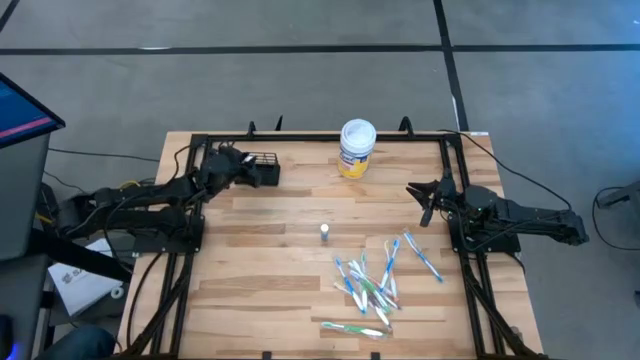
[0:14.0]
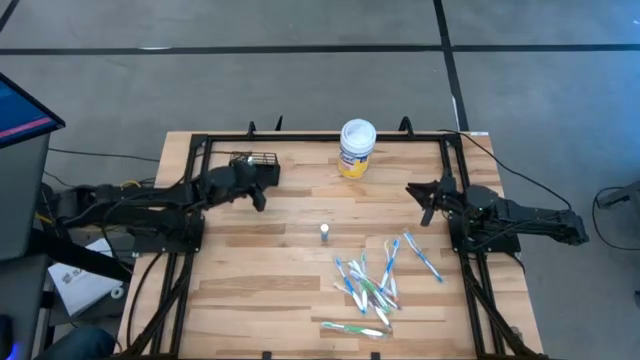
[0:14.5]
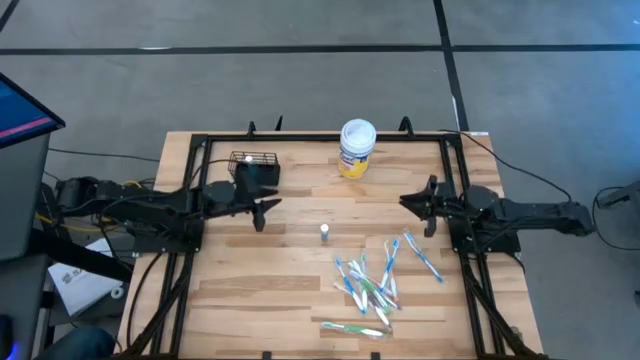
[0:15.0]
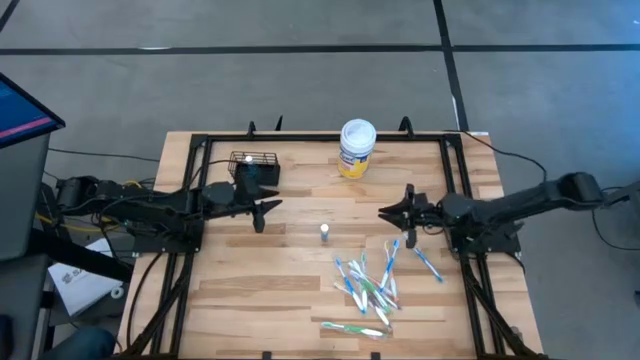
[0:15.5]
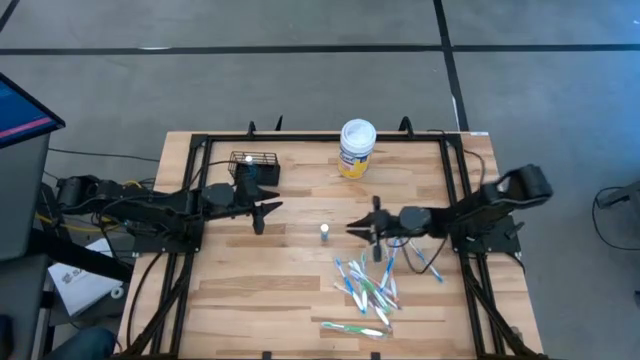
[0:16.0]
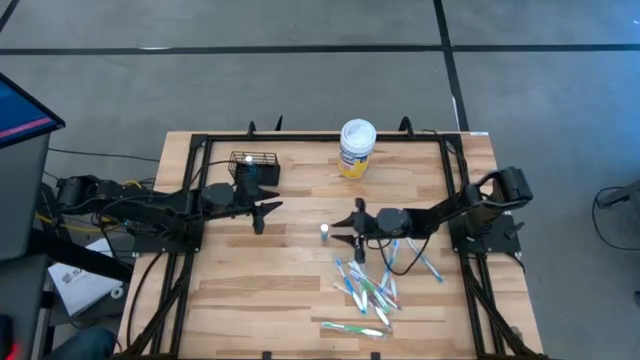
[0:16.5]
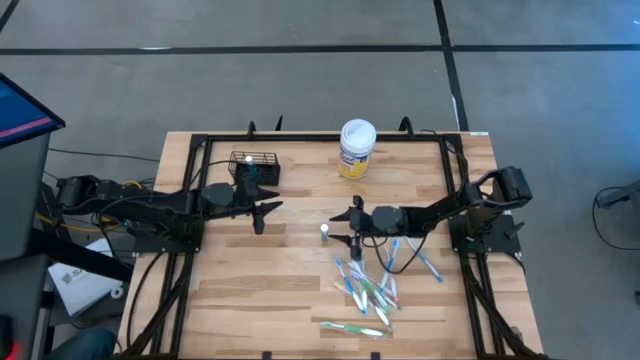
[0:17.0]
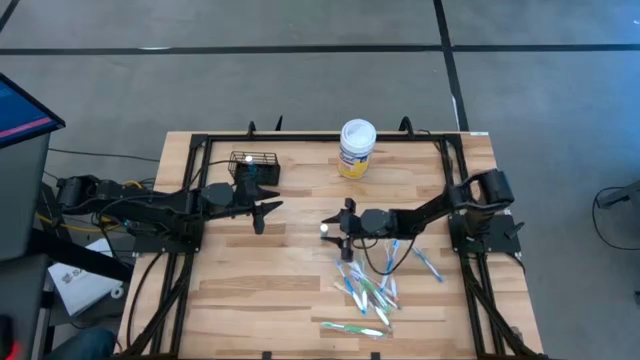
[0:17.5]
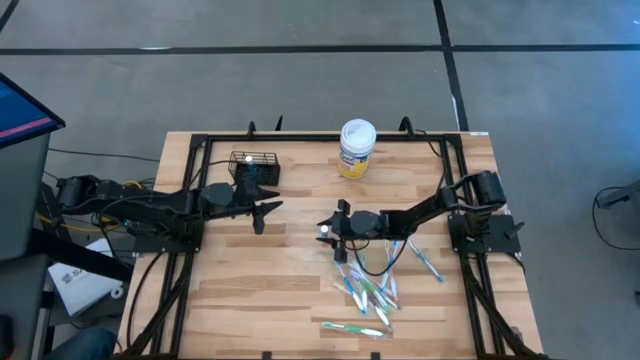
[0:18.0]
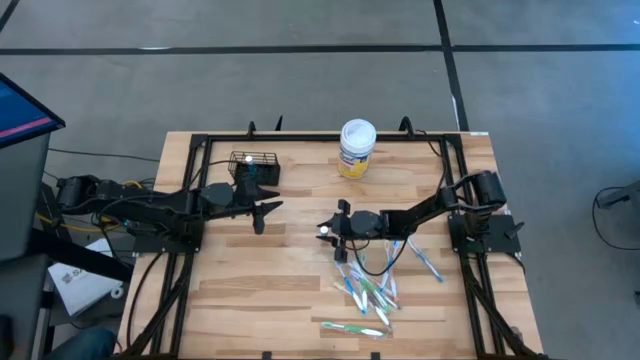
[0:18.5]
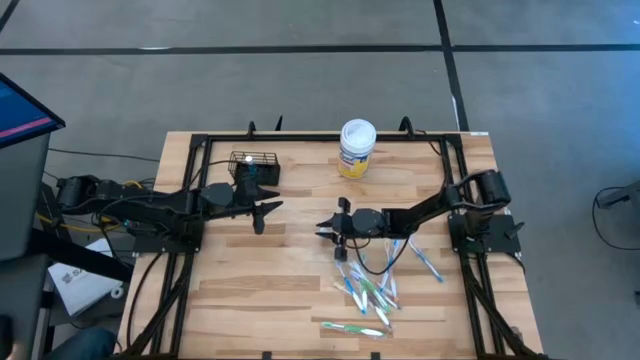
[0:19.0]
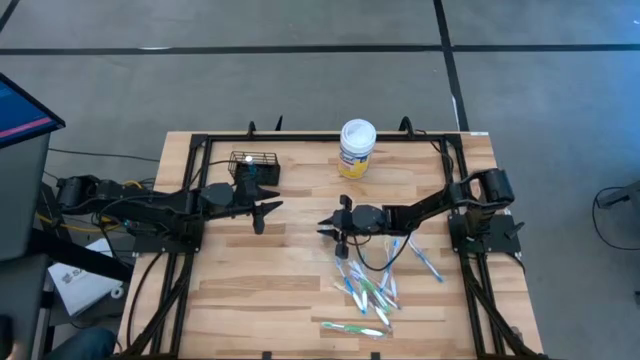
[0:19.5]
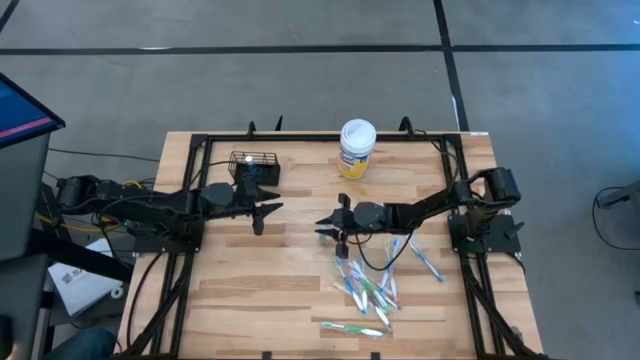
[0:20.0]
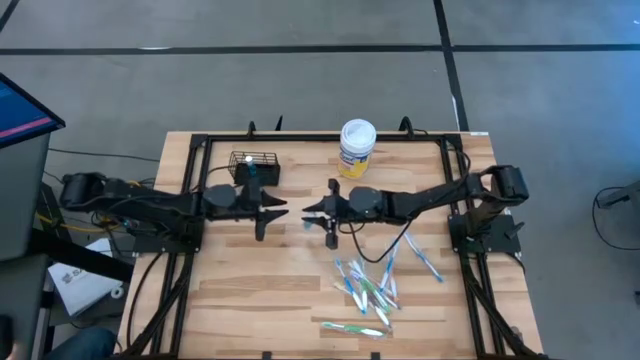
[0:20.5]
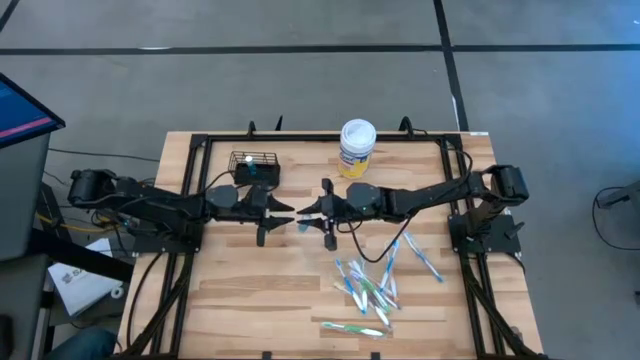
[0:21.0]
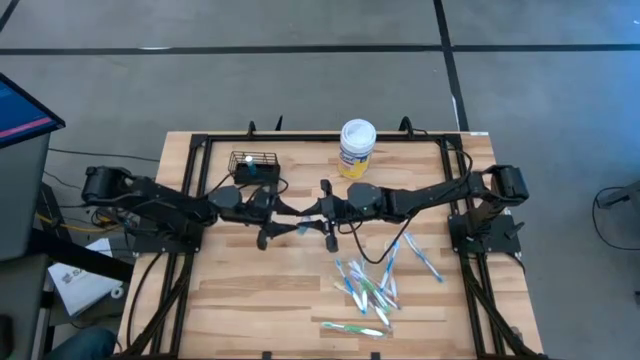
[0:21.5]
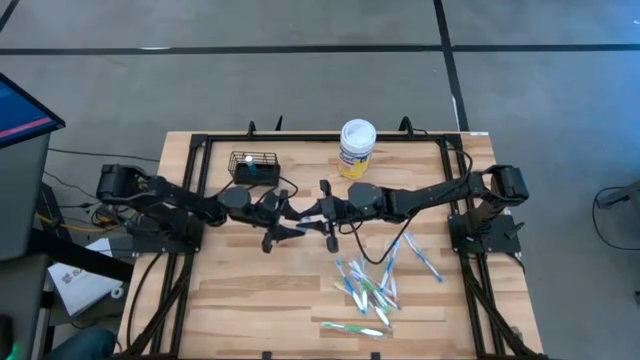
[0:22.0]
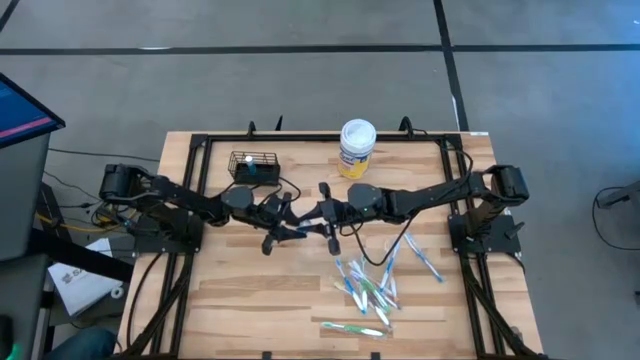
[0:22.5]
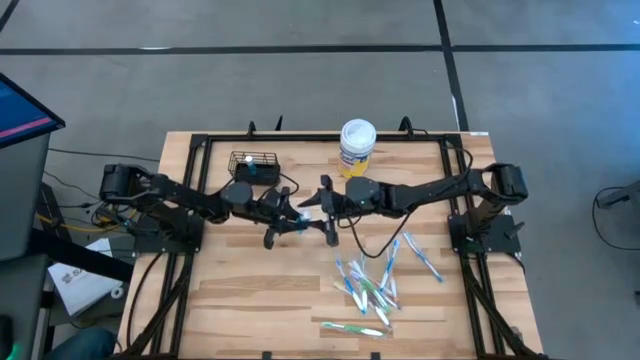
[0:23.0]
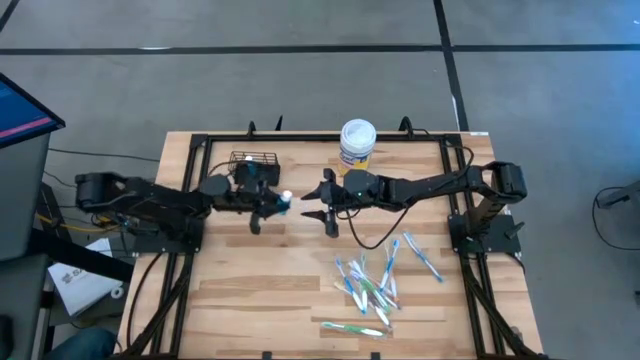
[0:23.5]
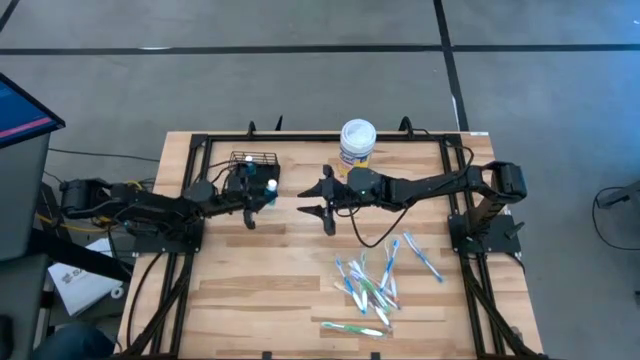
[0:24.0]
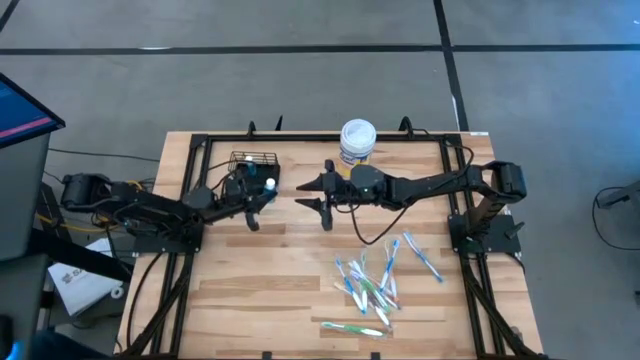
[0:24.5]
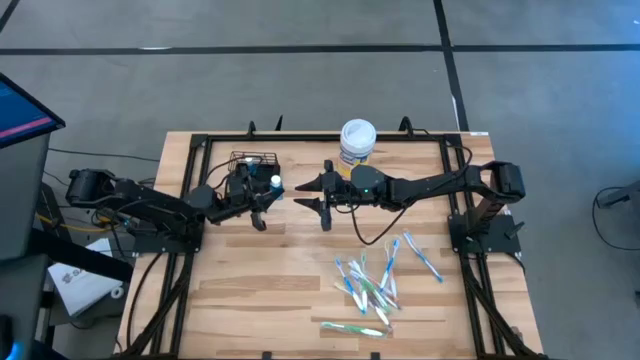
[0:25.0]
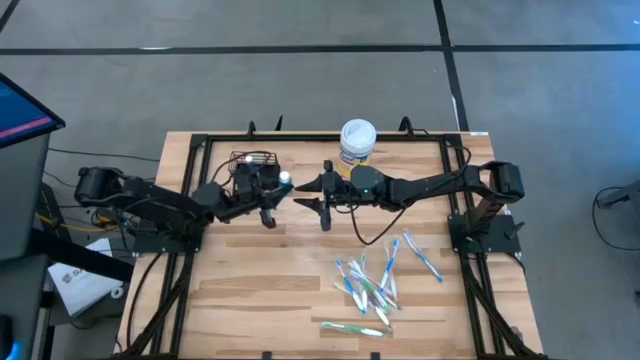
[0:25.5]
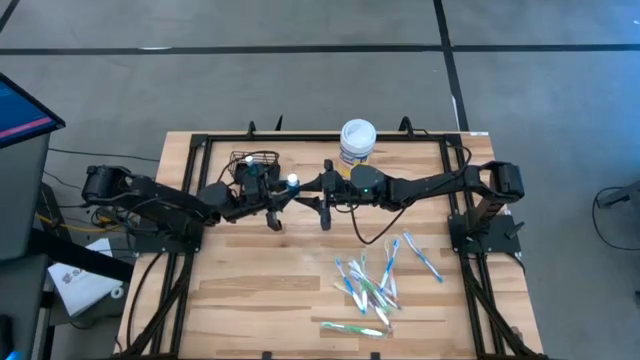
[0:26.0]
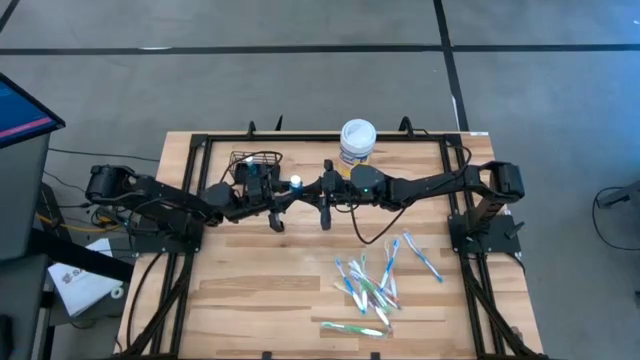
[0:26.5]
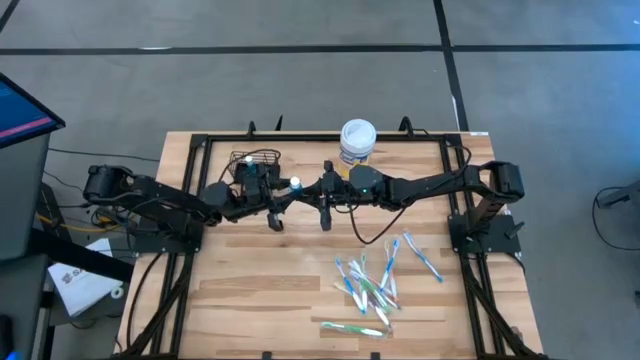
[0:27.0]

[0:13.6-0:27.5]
Task: Pick & Place toothbrushing station
Put the blue mouthwash into the mesh organizer

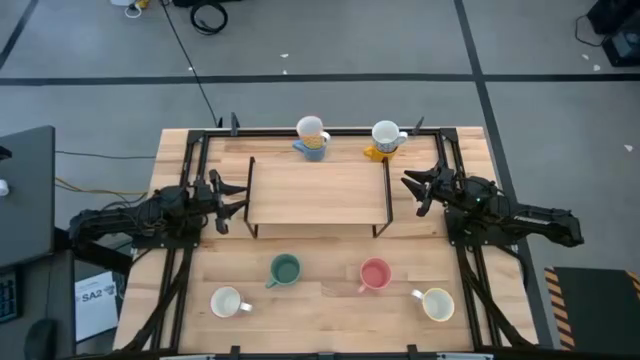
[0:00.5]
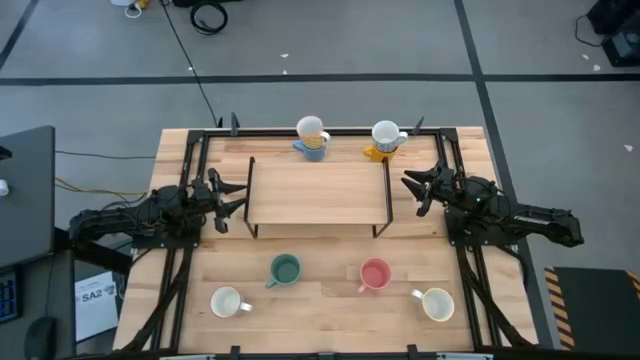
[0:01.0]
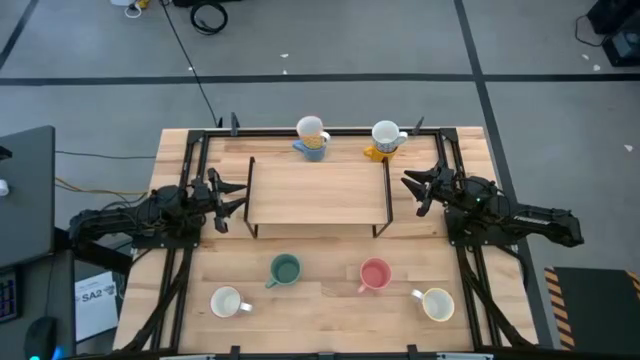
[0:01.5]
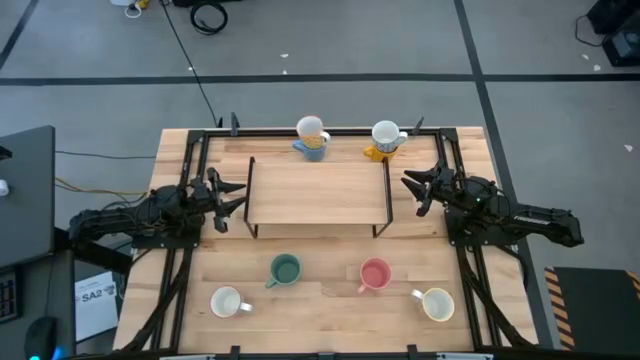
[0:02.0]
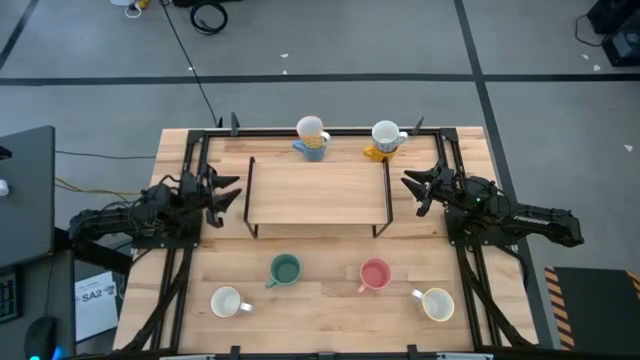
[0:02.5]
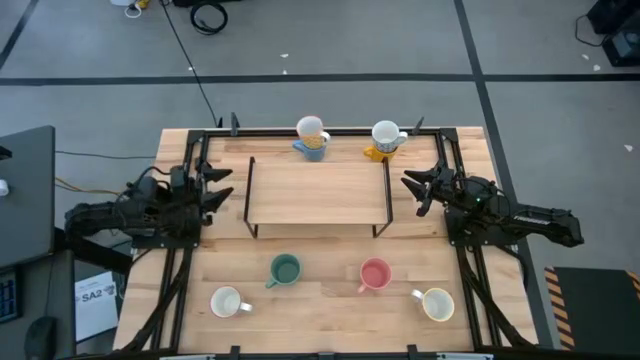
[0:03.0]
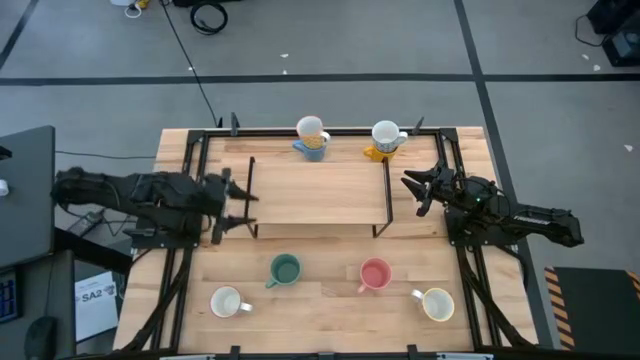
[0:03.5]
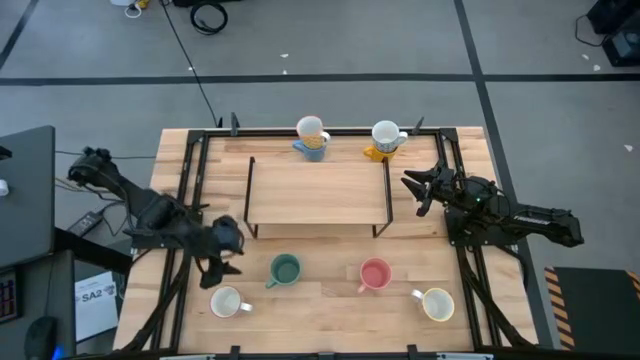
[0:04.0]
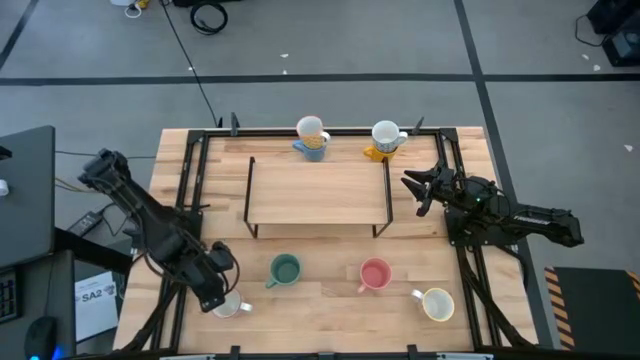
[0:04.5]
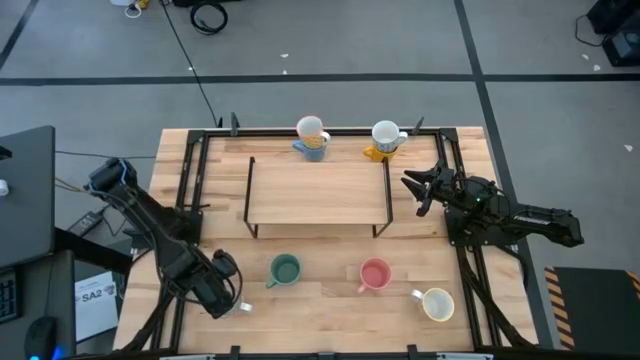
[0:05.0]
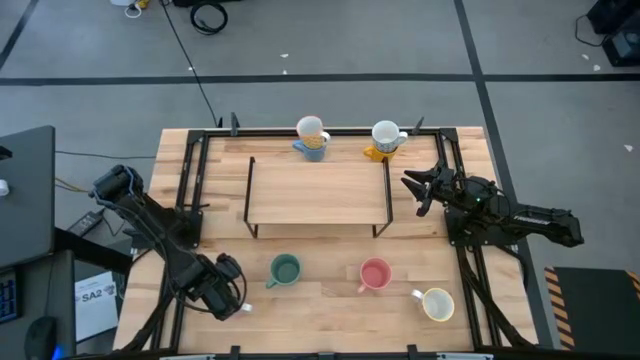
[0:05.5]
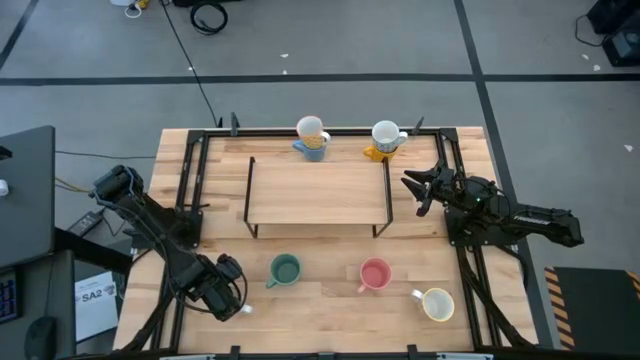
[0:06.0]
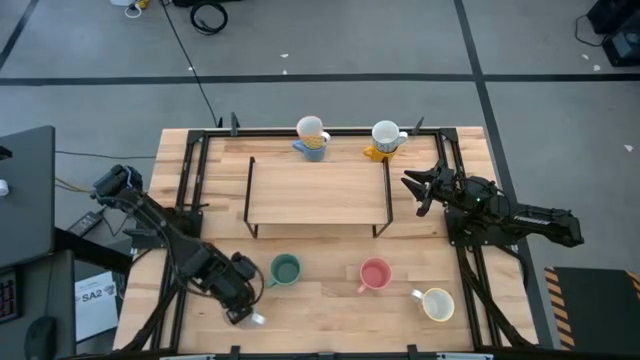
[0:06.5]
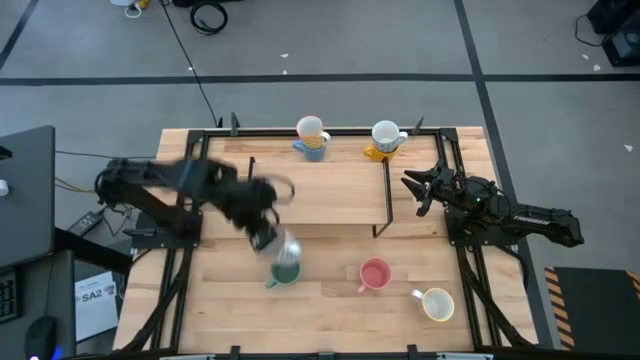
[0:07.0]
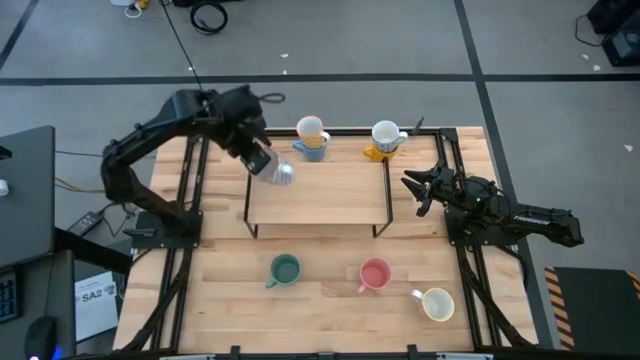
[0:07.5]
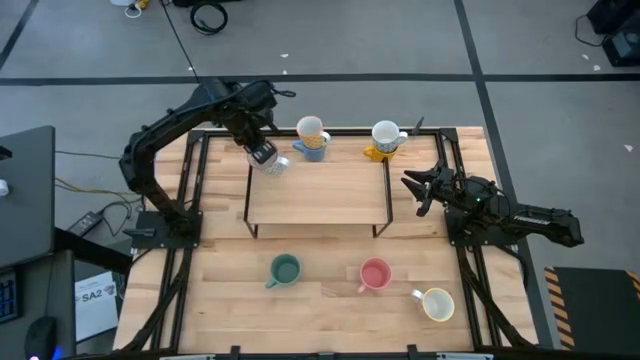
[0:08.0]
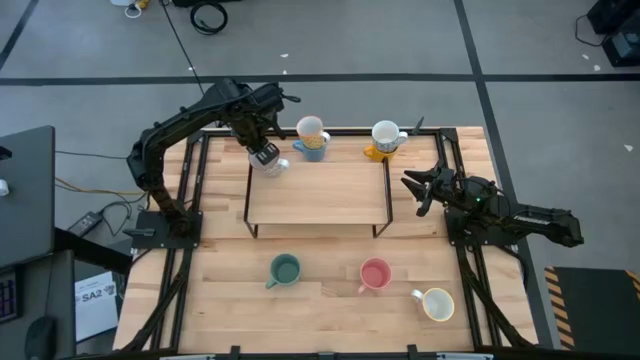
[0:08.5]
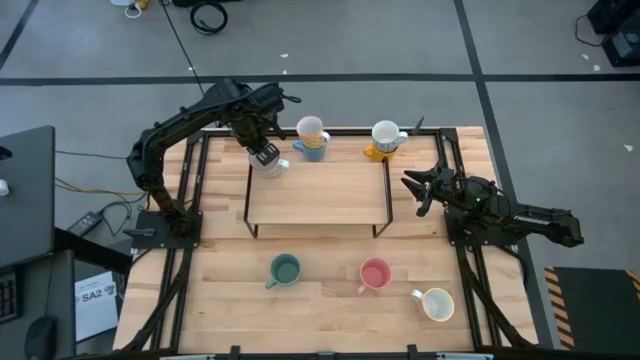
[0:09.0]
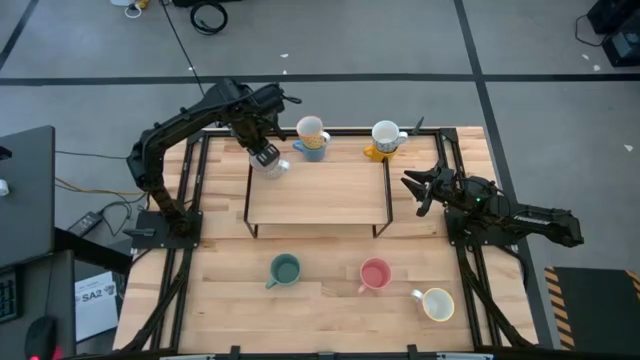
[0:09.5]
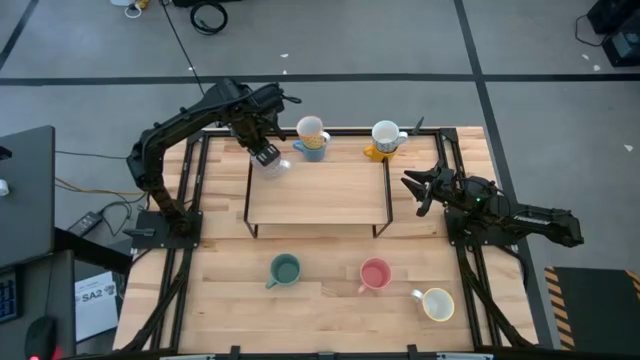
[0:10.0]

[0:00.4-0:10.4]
Task: Place coffee mugs
Put the gray patterned mug on the shelf
